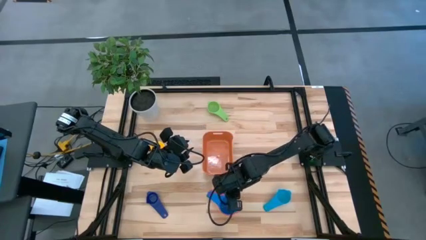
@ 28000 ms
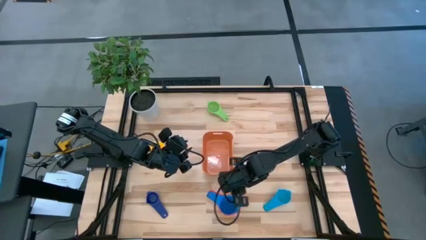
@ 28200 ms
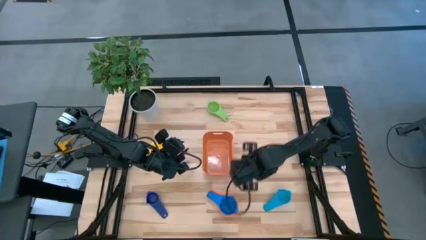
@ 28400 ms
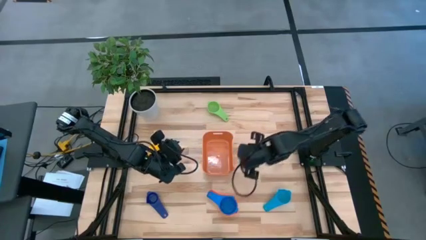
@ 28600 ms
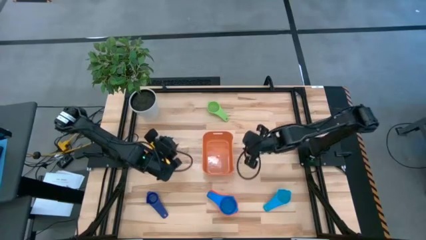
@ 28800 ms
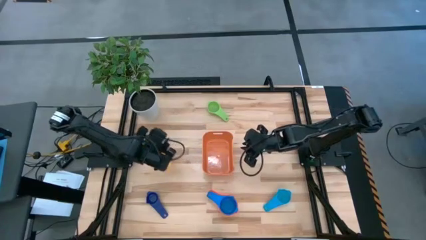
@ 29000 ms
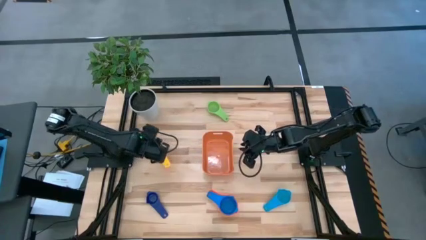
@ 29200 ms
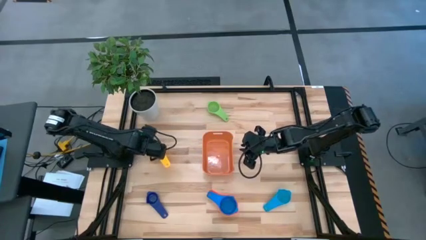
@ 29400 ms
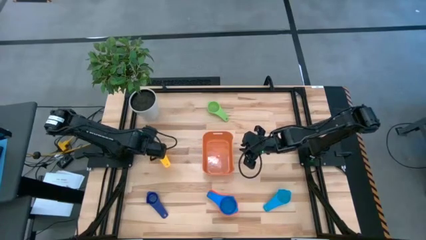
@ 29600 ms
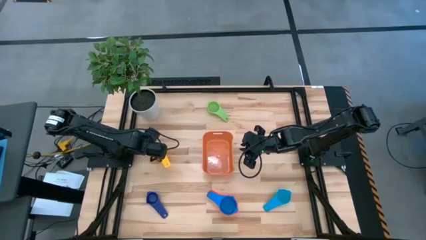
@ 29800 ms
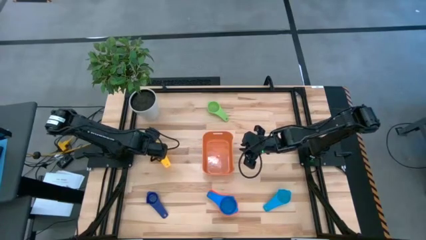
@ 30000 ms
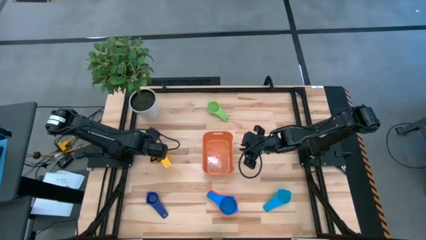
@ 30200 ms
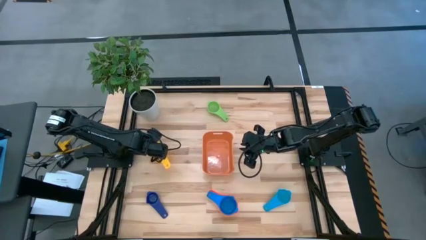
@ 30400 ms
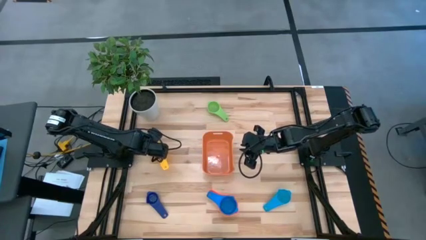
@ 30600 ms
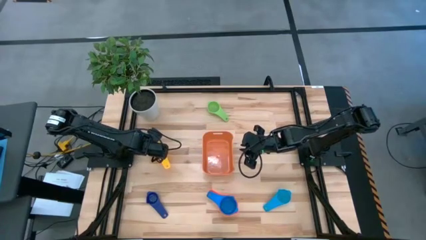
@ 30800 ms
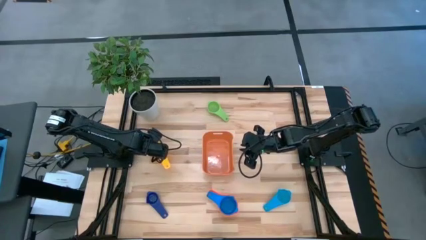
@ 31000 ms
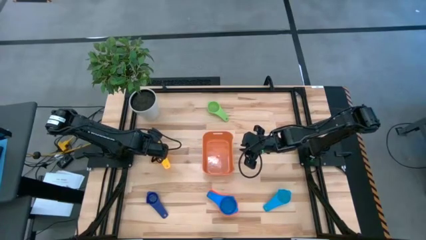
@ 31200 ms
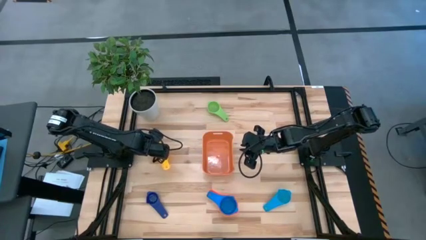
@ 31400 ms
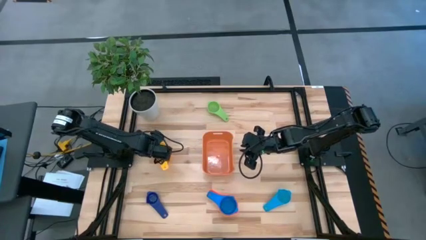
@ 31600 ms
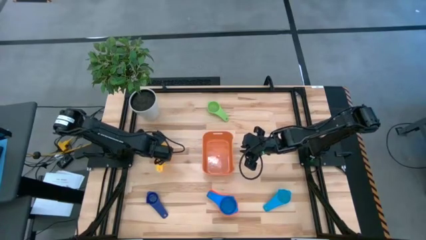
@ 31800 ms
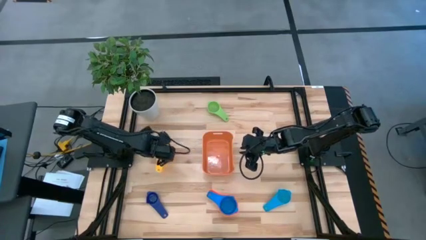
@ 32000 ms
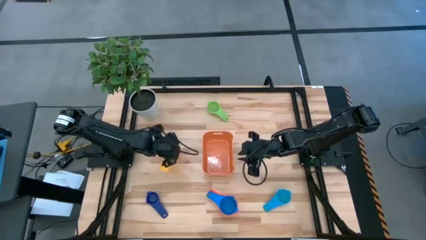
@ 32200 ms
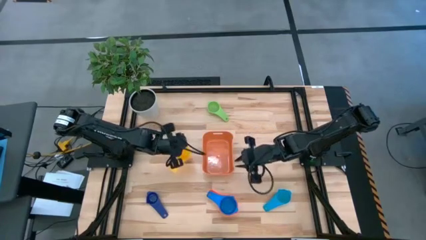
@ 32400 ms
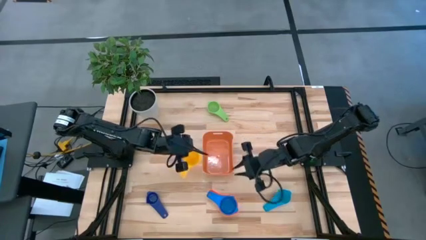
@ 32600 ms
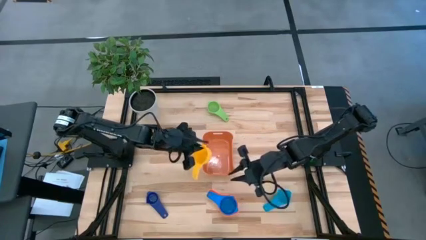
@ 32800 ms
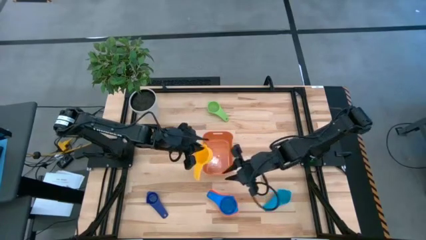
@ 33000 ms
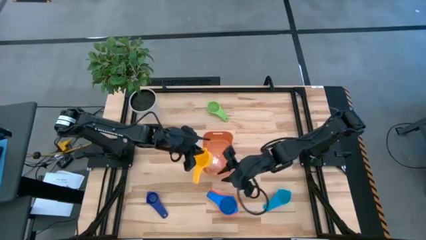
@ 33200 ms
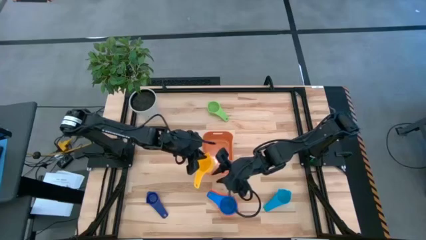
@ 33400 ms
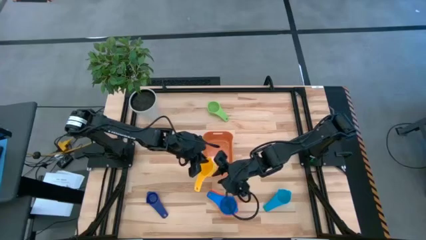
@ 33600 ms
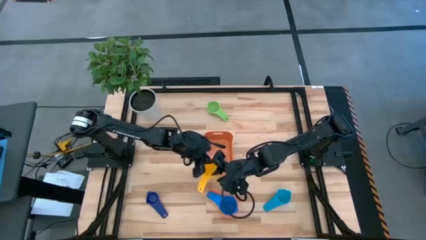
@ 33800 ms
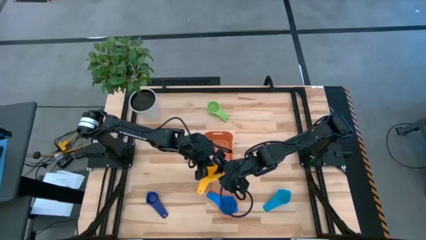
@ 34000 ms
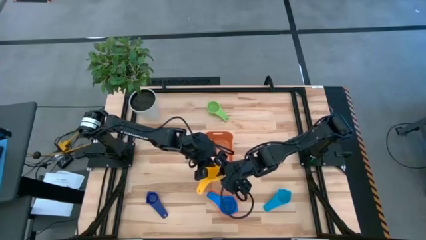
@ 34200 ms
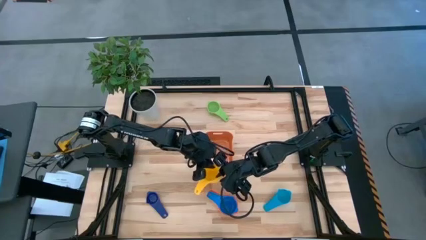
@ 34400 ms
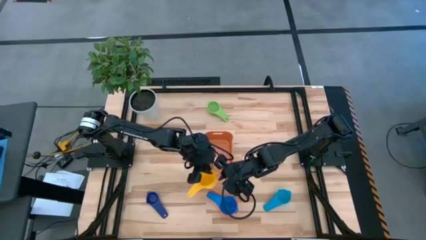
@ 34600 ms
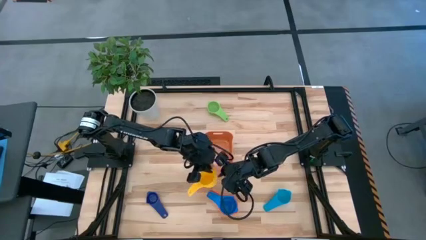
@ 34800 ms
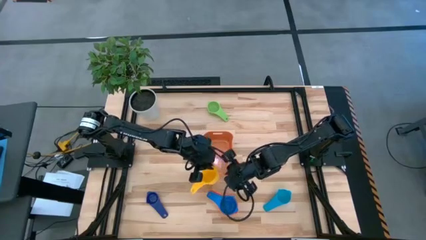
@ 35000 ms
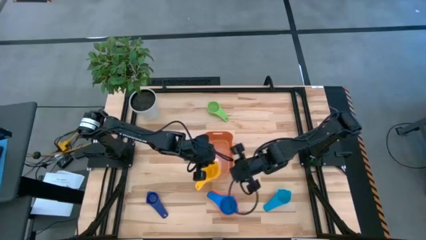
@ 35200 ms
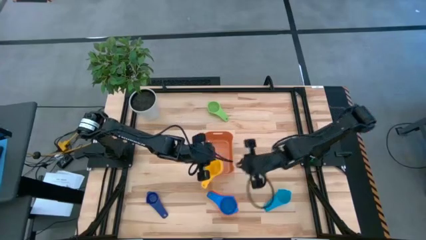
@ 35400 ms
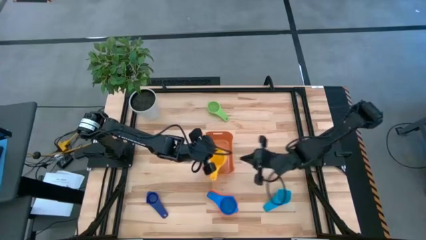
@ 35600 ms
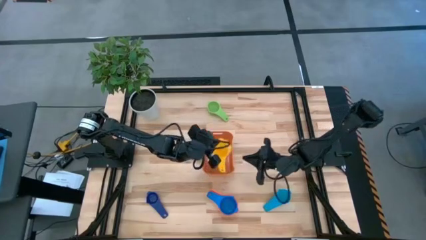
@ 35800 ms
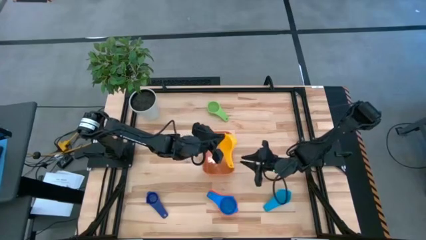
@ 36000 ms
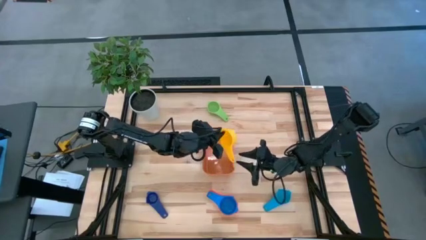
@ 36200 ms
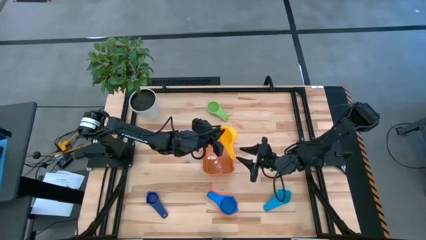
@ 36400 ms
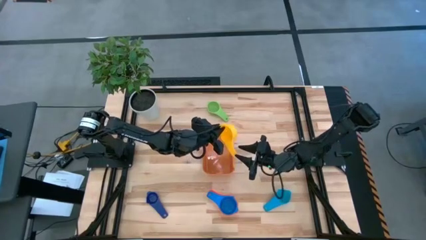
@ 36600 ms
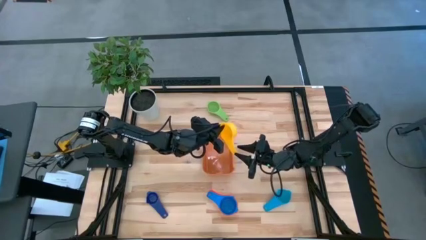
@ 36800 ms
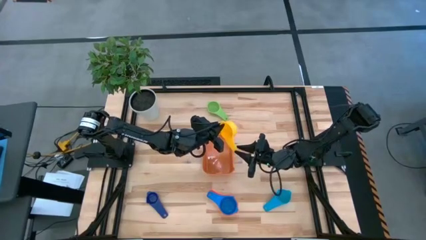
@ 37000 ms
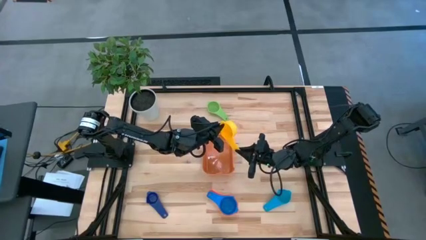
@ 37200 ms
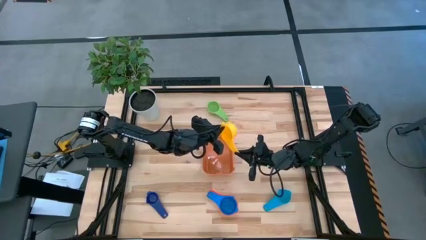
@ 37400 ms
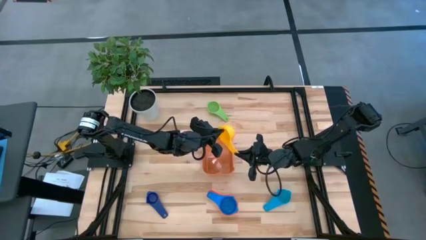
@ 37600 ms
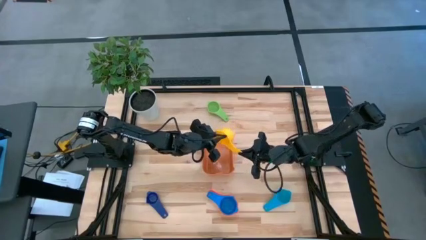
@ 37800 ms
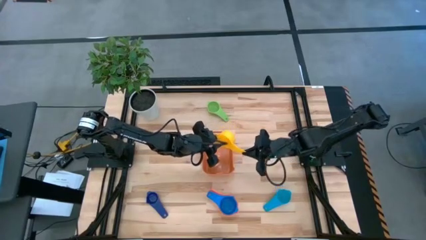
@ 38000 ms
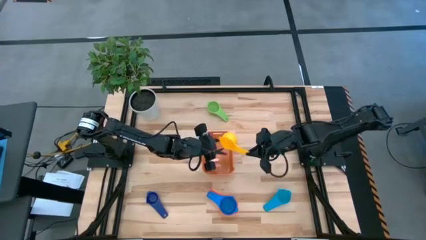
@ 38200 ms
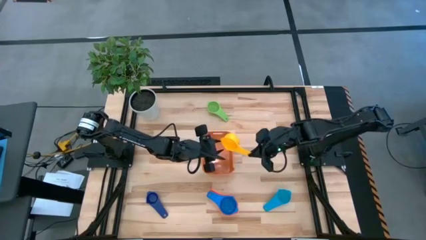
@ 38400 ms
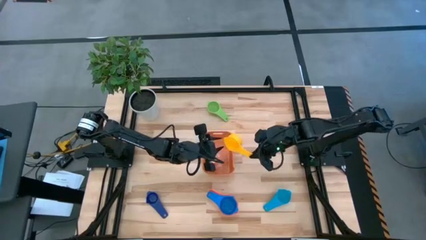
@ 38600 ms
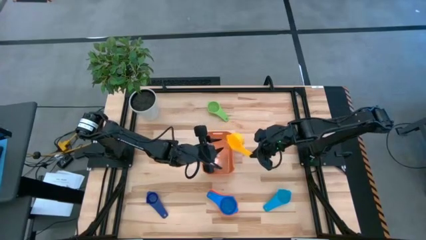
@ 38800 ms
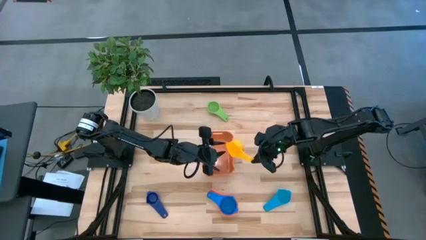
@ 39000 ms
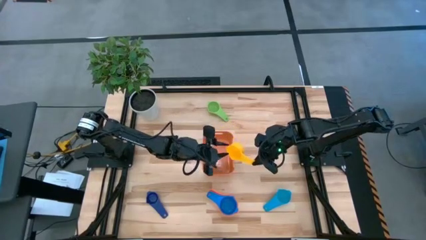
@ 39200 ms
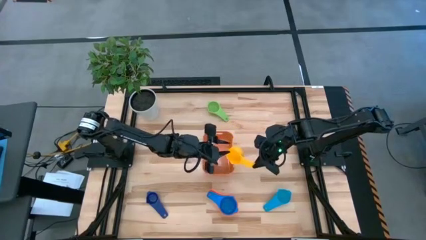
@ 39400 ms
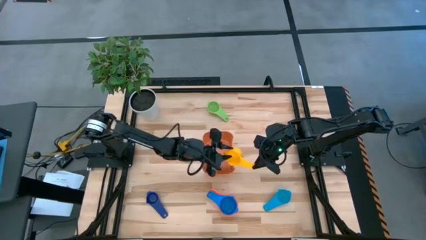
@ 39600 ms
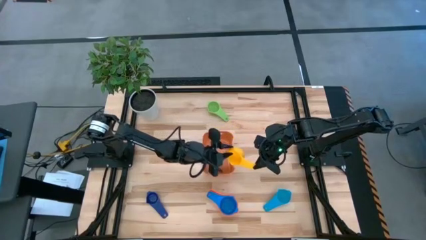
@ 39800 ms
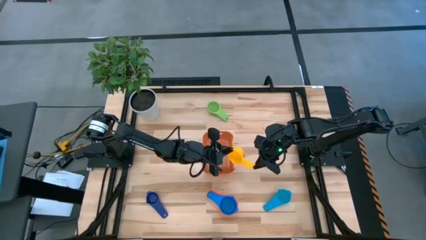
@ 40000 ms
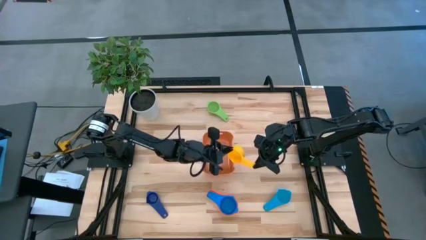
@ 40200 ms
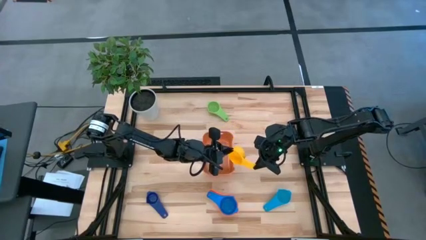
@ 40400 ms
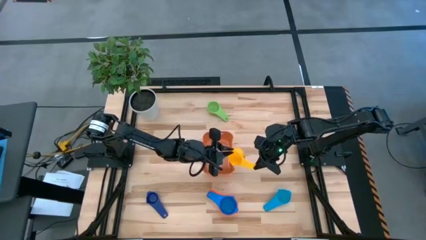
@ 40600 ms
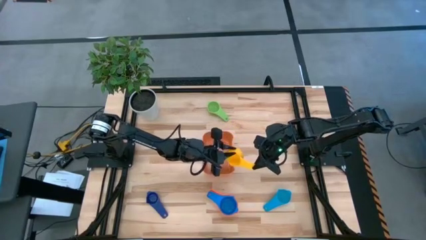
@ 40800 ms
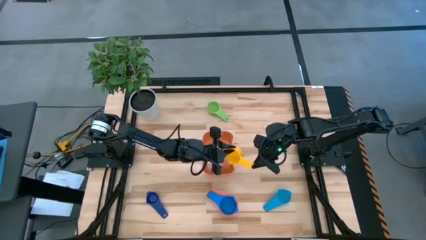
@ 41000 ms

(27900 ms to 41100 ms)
Task: Nest measuring cups in basket
Stack the yellow measuring cup on top of the blue measuring cup
